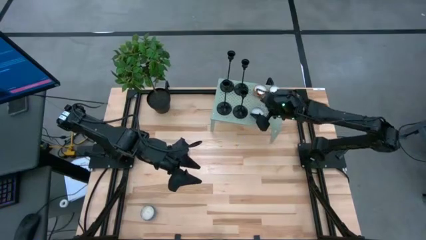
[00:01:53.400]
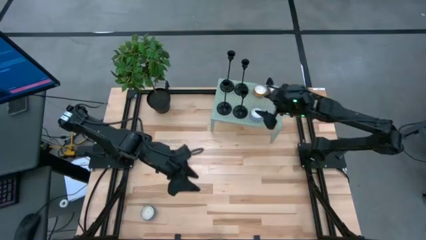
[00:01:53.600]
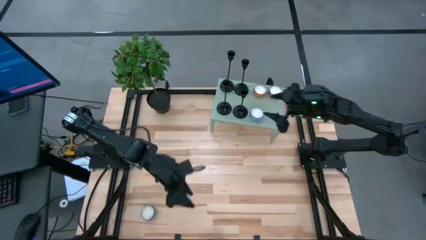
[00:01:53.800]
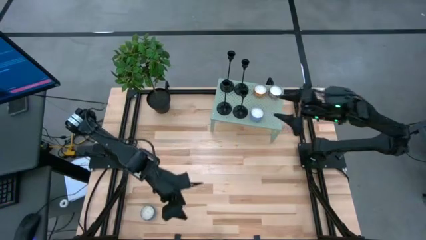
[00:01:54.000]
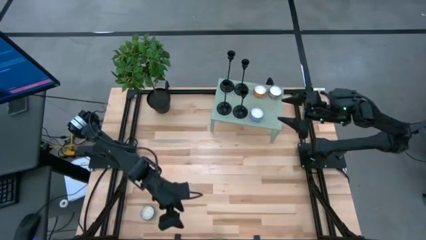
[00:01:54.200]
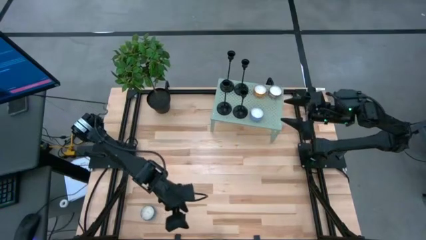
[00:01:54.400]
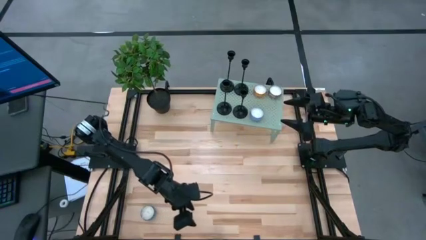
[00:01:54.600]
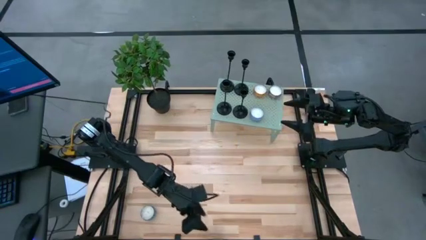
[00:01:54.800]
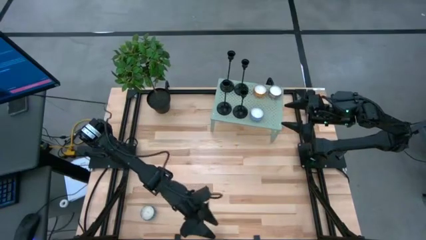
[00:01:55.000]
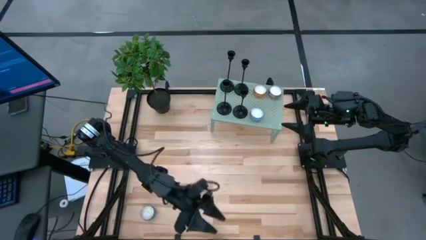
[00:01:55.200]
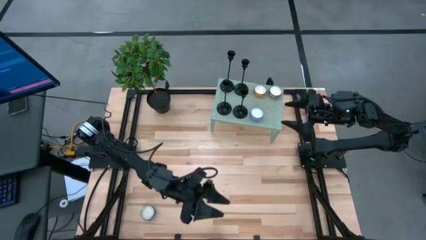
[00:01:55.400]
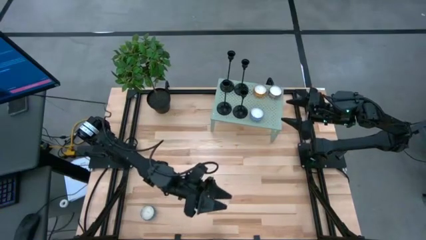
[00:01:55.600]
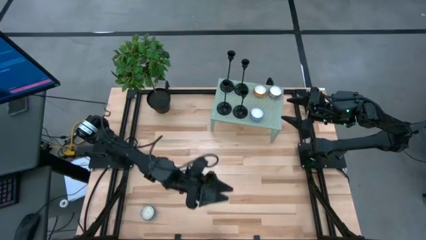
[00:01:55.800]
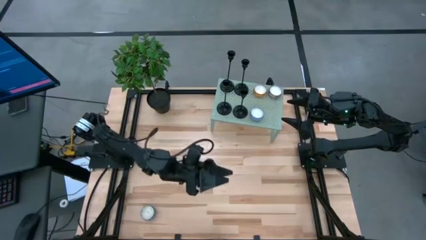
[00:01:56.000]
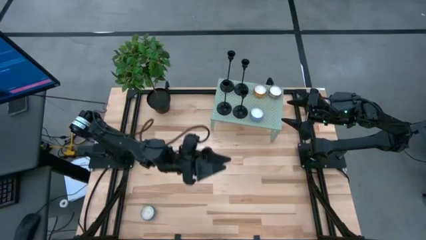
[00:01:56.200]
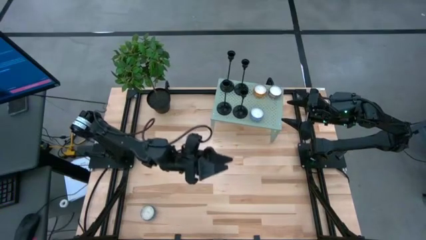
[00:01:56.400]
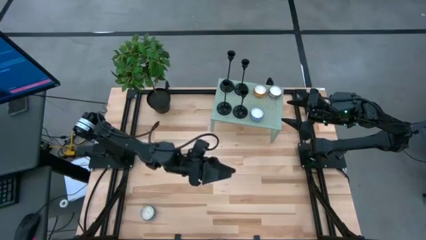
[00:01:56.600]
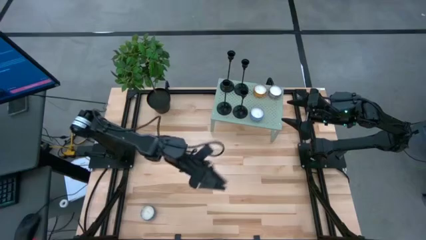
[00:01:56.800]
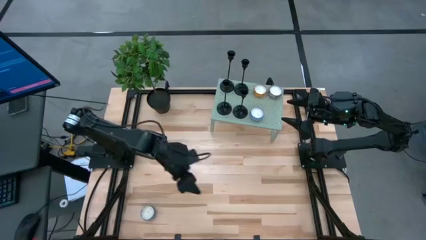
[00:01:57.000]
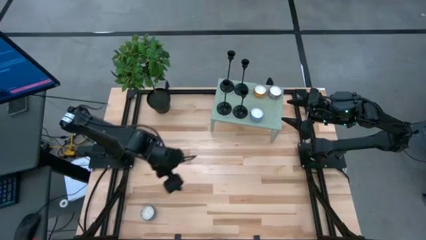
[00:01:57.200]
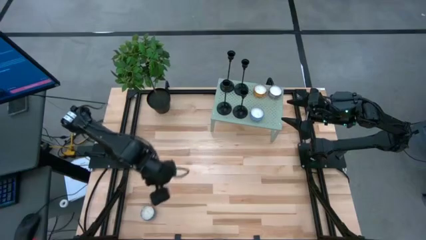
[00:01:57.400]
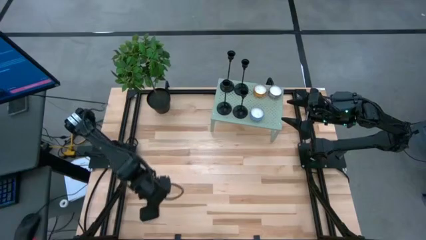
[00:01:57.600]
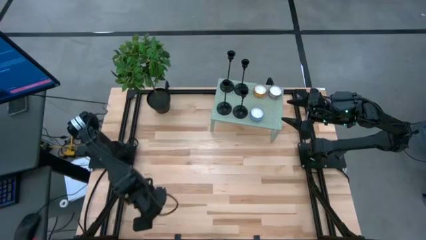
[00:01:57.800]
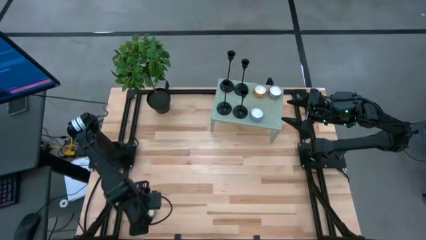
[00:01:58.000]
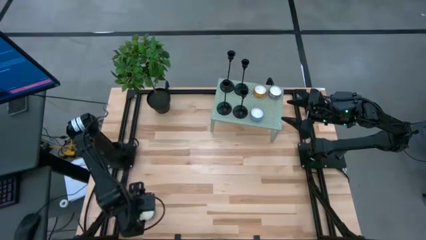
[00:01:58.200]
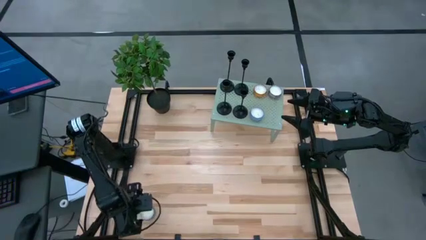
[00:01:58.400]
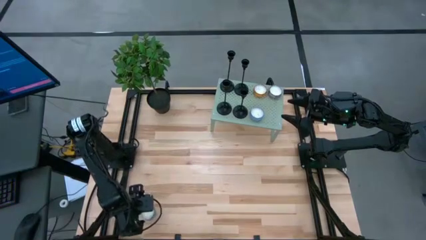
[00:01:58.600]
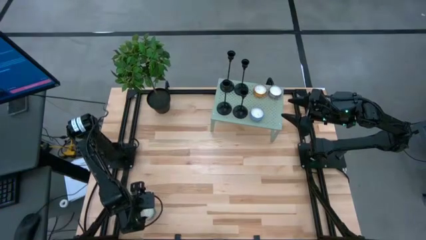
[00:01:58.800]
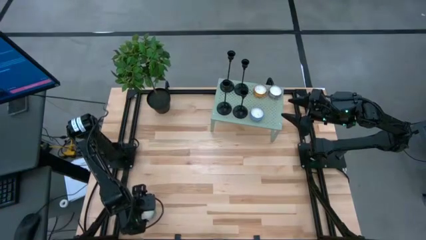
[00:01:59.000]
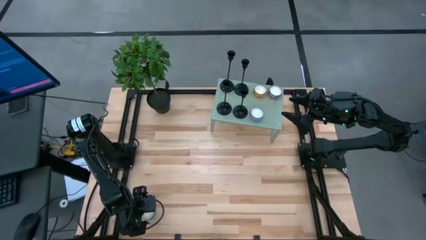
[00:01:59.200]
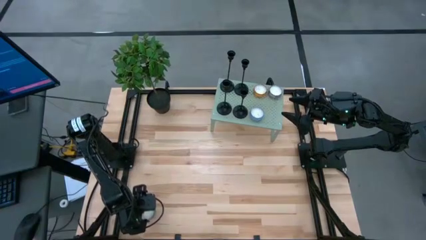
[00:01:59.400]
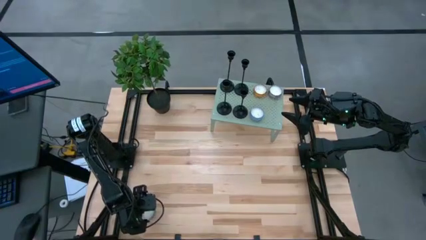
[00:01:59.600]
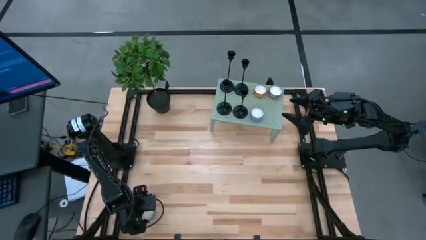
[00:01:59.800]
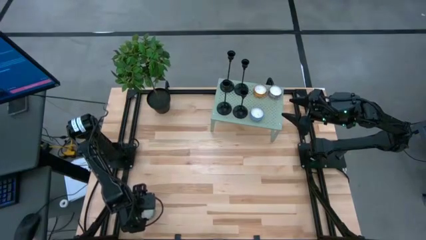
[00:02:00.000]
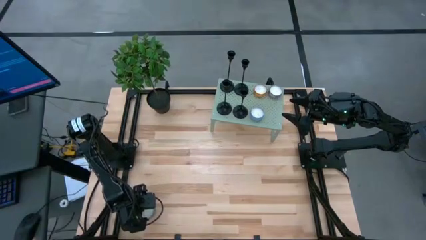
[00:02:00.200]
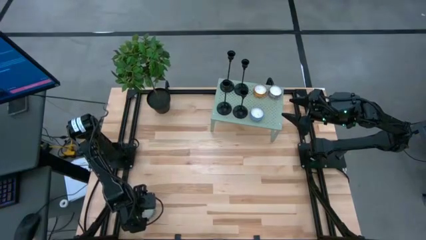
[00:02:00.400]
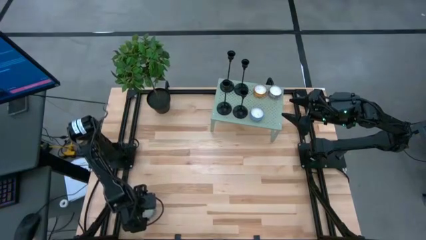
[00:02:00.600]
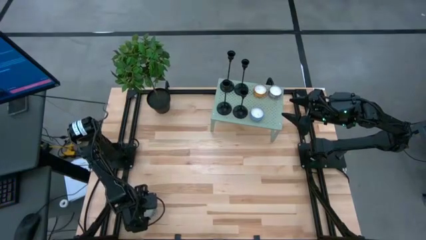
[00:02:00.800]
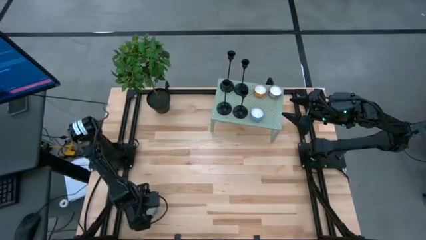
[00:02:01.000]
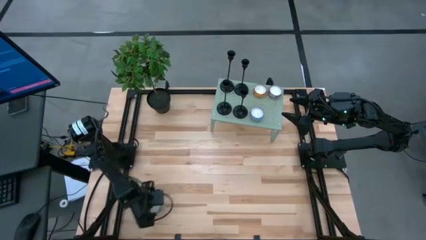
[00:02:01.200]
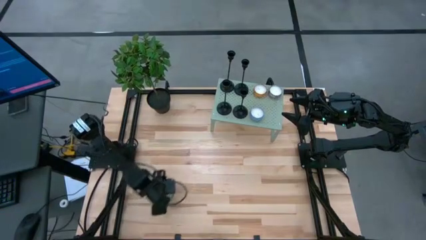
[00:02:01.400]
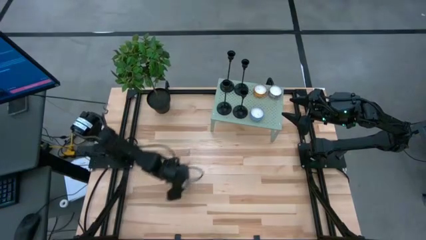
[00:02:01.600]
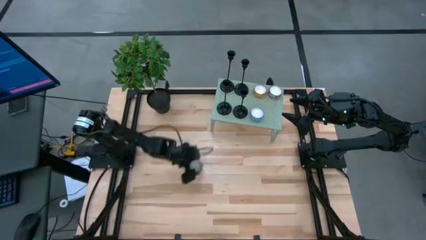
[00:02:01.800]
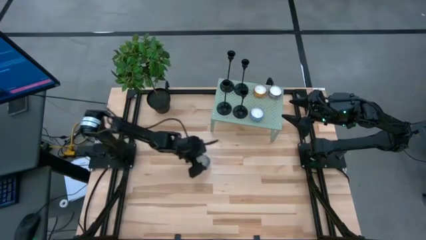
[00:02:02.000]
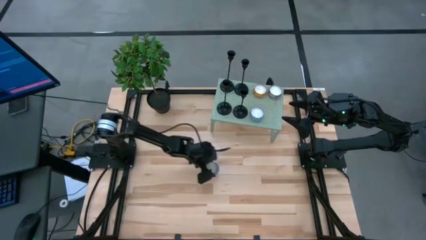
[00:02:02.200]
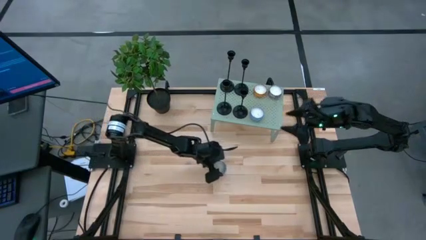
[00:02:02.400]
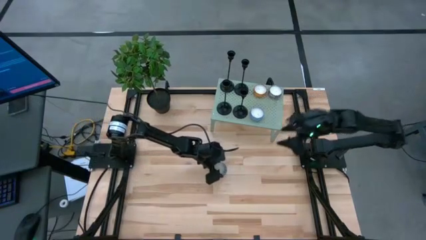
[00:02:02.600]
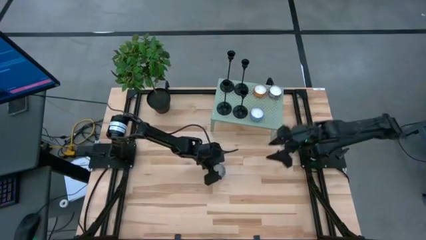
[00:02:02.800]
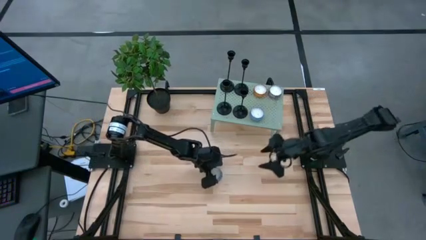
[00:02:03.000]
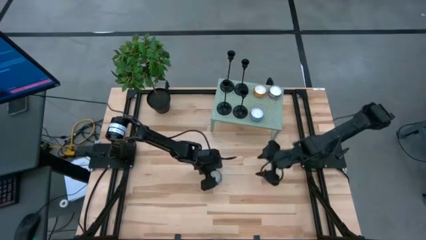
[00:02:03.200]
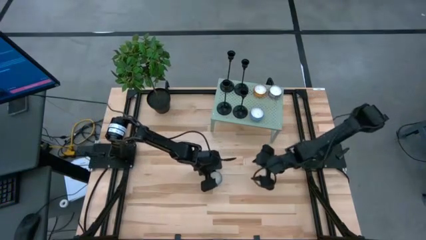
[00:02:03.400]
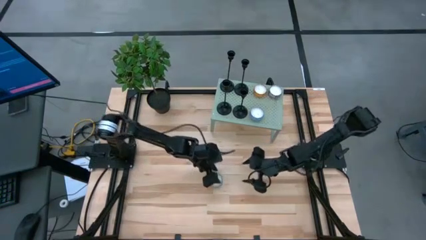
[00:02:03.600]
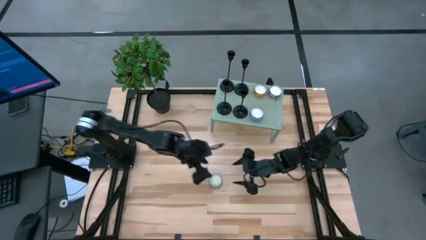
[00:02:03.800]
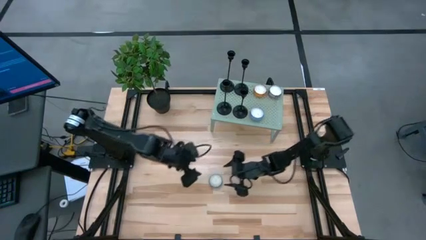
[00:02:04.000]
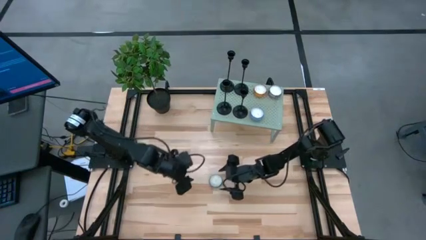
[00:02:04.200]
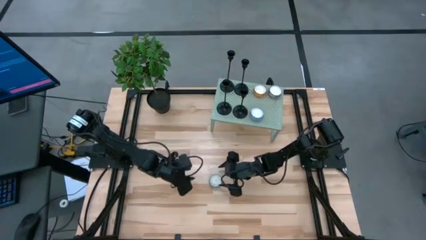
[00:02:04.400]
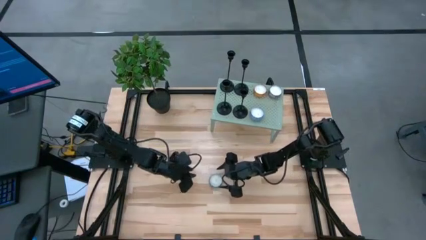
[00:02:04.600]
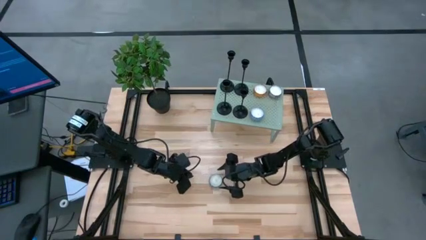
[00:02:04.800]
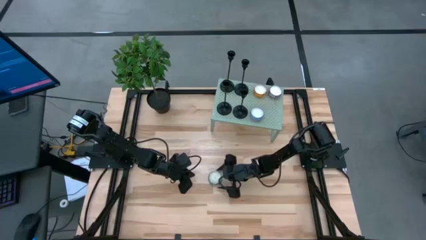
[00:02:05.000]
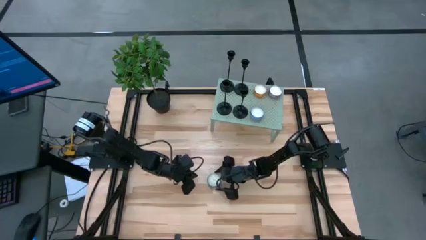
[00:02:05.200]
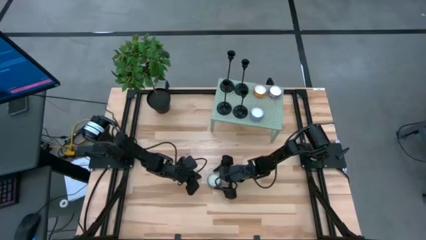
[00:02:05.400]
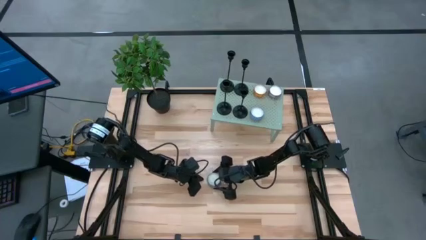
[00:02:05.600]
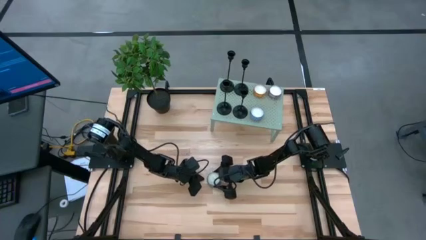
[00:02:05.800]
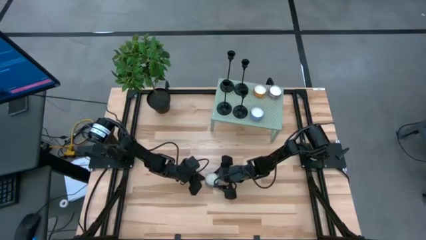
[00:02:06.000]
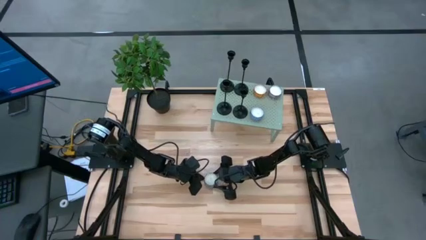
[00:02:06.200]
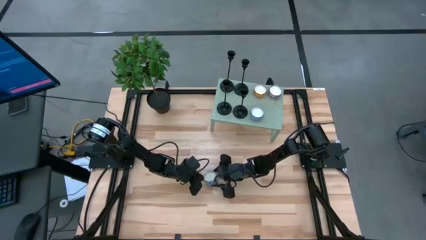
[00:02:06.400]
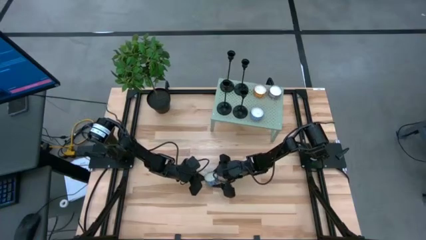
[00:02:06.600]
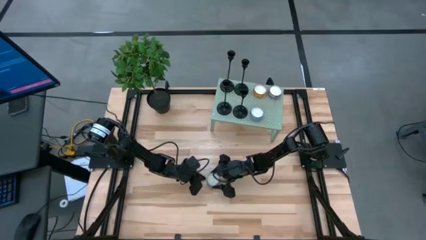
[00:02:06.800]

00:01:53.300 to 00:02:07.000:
Task: Pick & Place candle stick holders
Put the blue scented candle on the shelf

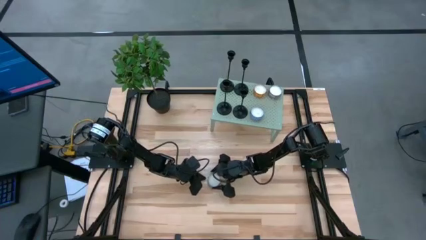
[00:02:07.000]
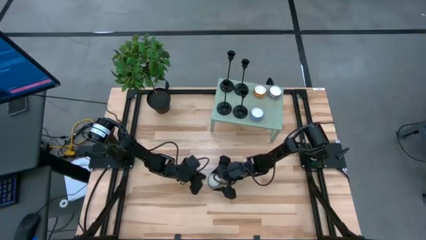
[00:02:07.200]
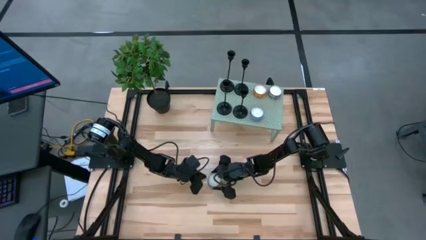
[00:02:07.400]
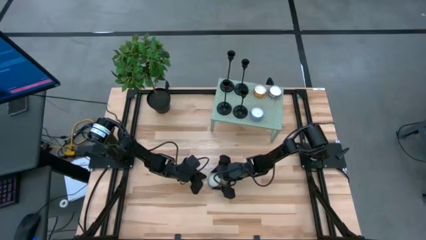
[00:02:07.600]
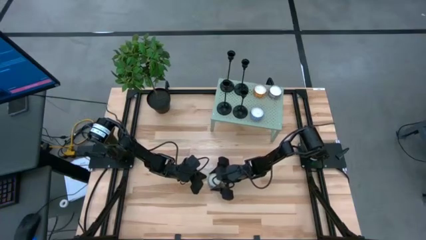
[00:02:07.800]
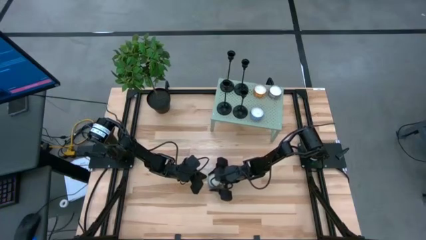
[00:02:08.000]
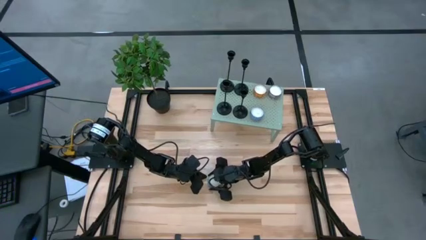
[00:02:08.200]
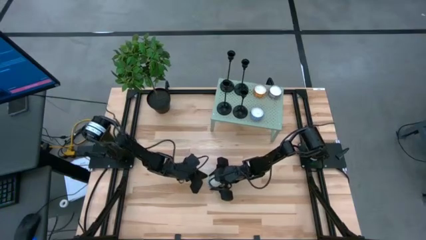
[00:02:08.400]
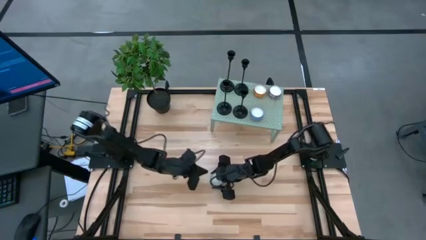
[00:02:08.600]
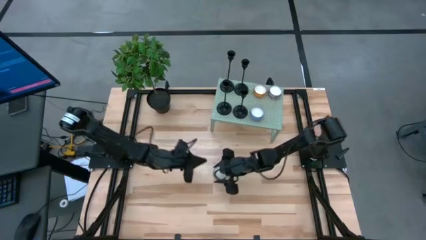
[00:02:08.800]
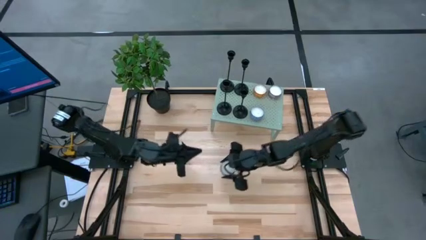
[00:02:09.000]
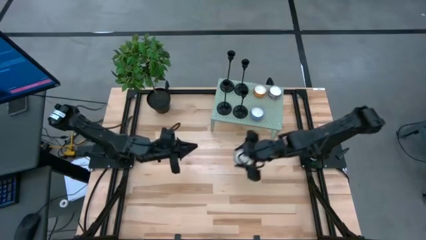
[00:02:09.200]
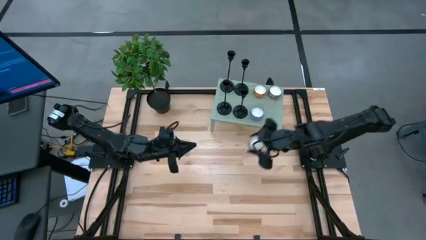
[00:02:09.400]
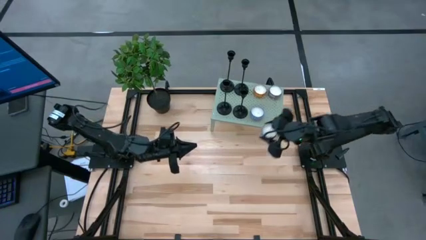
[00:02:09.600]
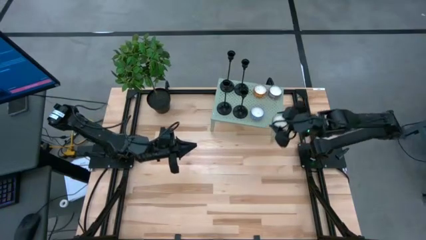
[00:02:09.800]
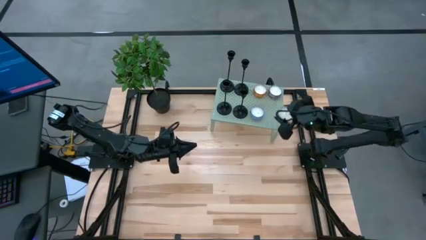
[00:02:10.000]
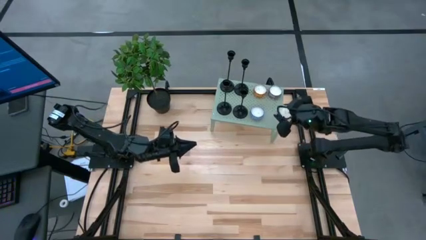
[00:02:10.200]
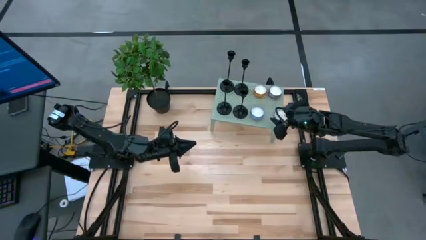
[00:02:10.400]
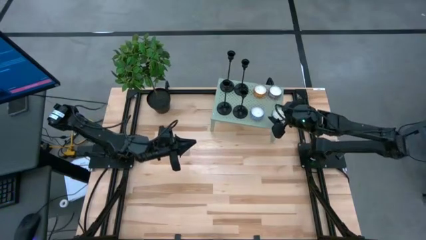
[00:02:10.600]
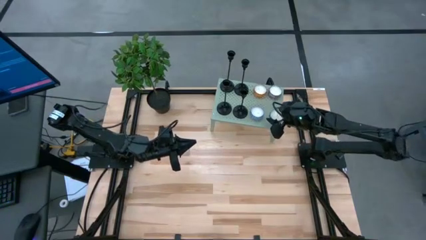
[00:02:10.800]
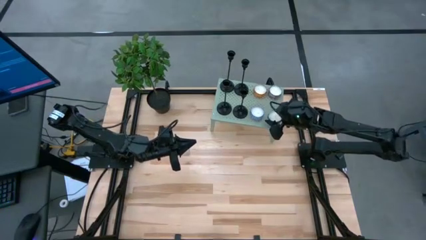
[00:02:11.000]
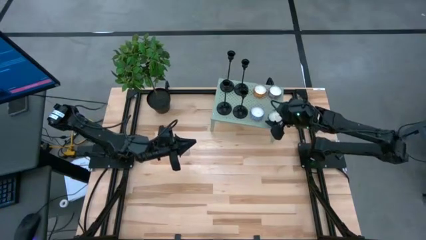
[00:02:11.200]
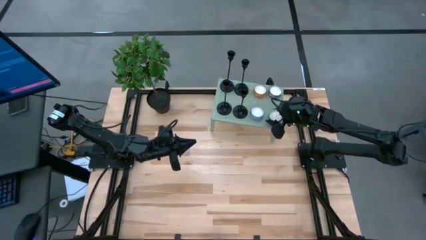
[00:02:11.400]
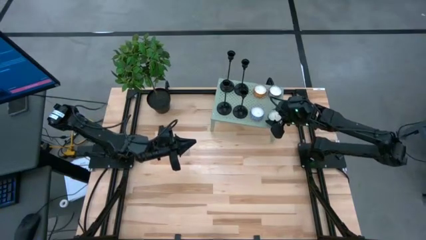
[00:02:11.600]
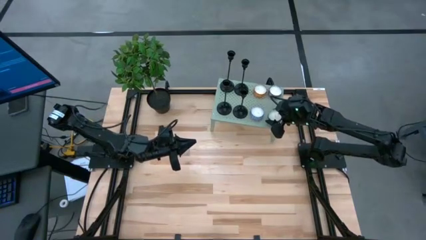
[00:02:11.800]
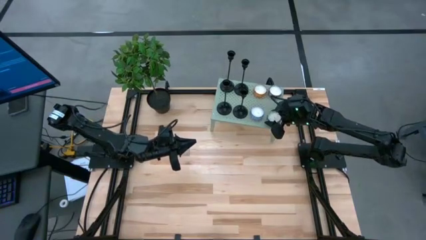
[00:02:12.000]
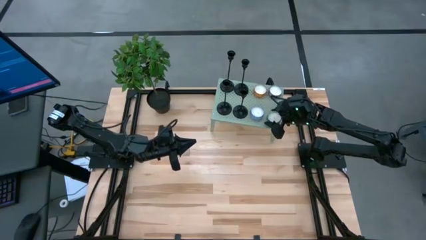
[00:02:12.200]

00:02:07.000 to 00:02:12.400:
Put the blue scented candle on the shelf
